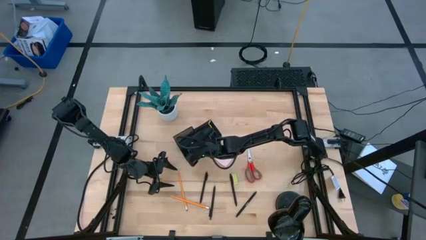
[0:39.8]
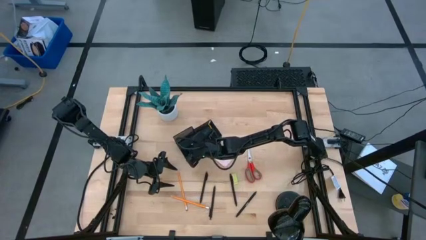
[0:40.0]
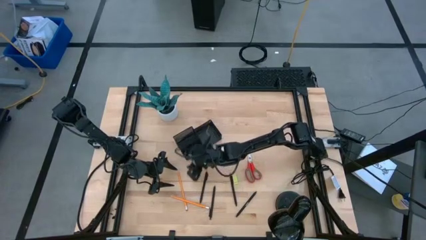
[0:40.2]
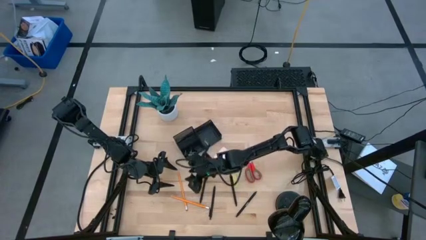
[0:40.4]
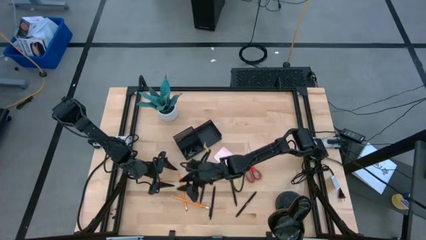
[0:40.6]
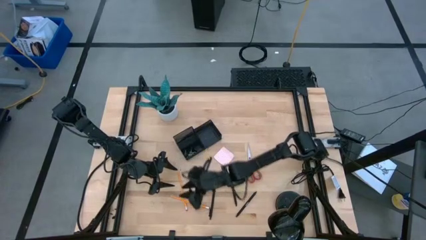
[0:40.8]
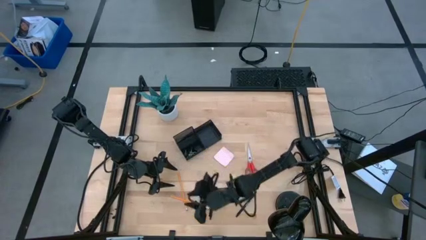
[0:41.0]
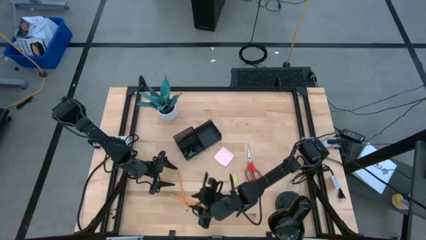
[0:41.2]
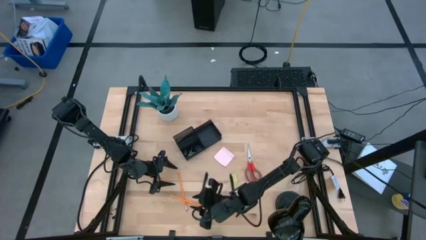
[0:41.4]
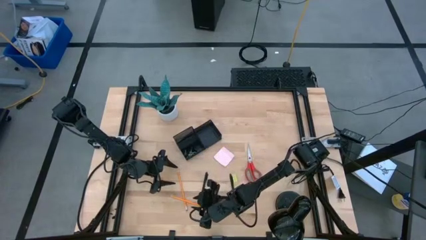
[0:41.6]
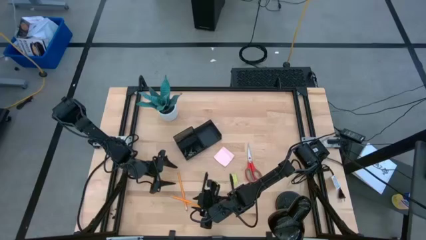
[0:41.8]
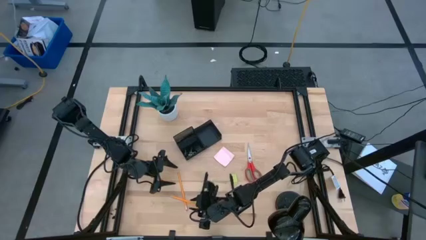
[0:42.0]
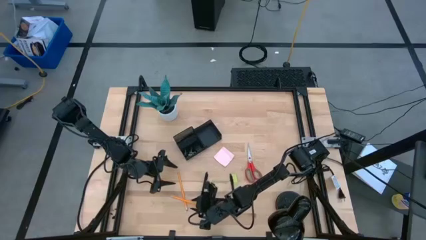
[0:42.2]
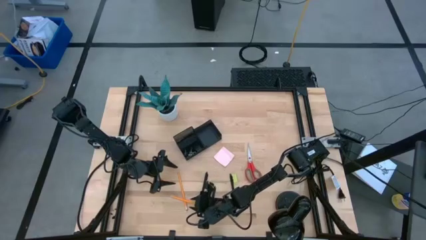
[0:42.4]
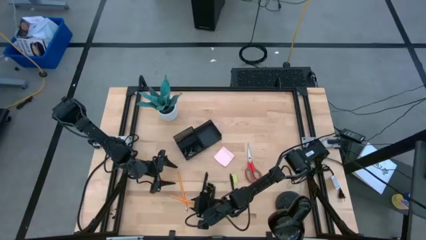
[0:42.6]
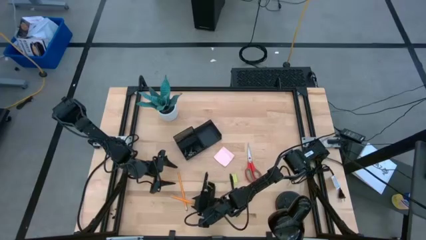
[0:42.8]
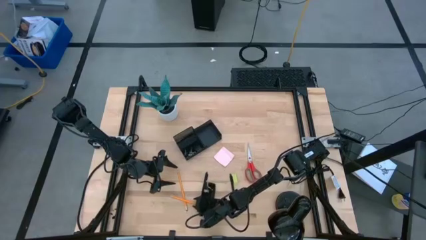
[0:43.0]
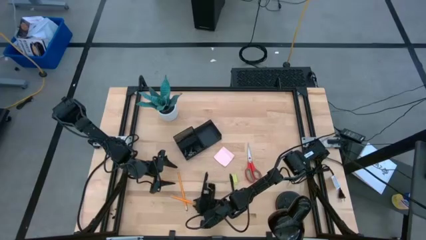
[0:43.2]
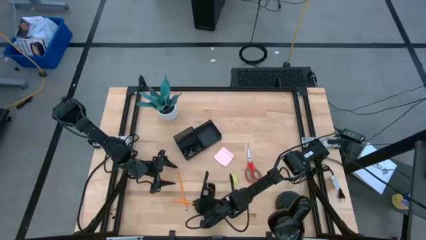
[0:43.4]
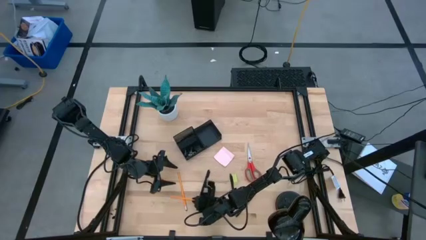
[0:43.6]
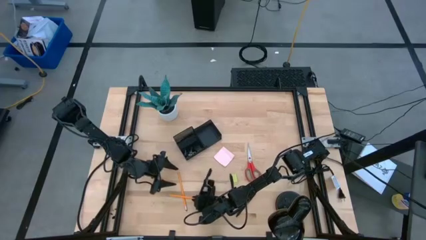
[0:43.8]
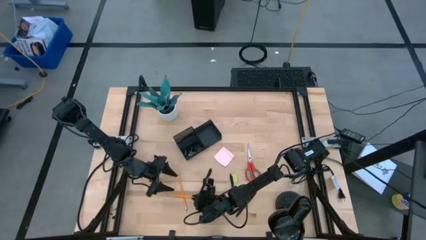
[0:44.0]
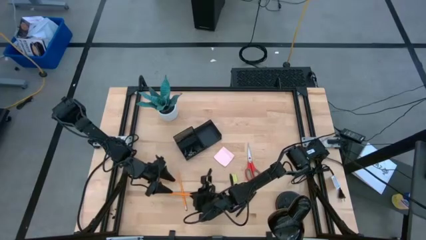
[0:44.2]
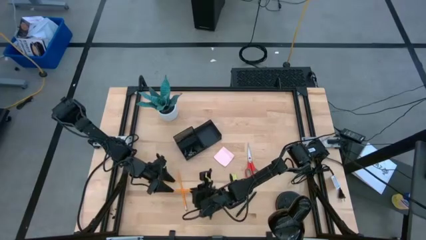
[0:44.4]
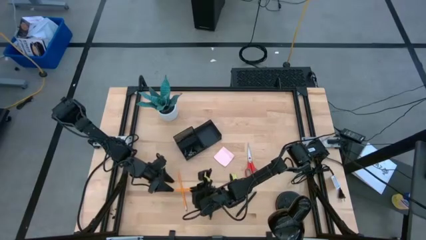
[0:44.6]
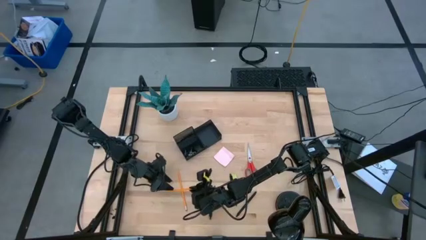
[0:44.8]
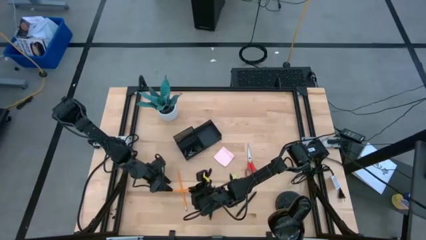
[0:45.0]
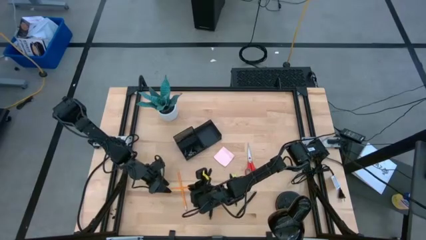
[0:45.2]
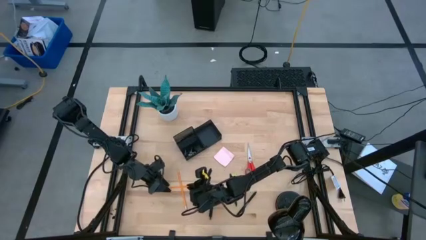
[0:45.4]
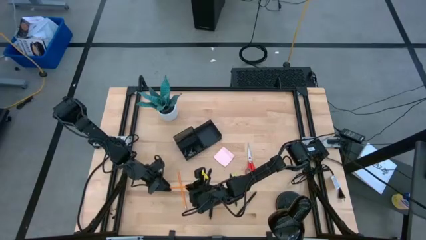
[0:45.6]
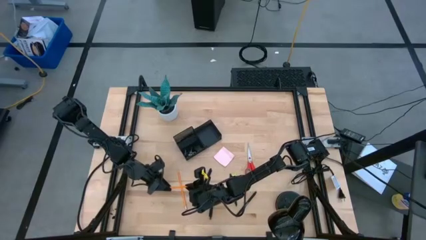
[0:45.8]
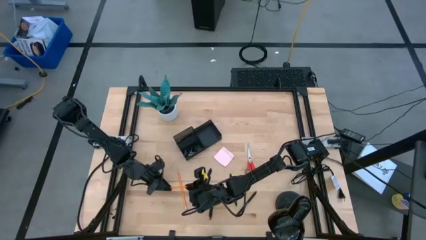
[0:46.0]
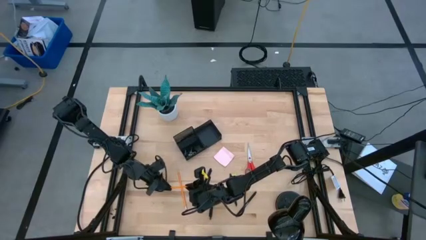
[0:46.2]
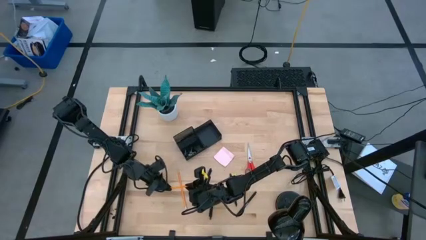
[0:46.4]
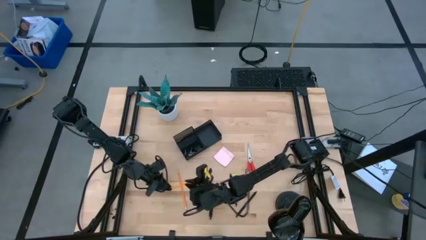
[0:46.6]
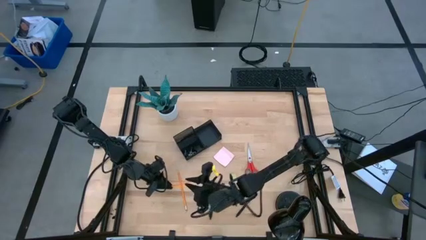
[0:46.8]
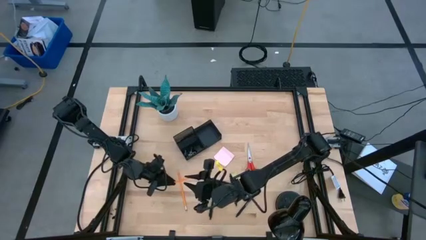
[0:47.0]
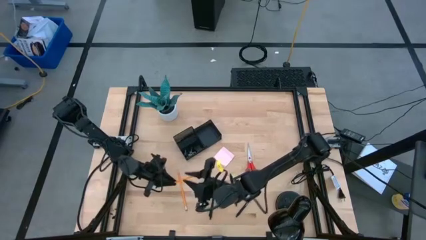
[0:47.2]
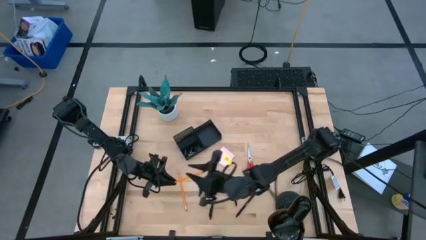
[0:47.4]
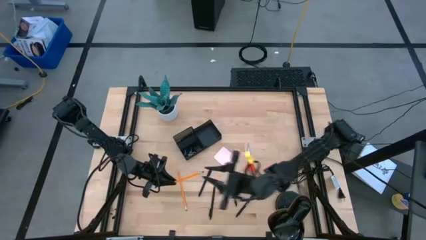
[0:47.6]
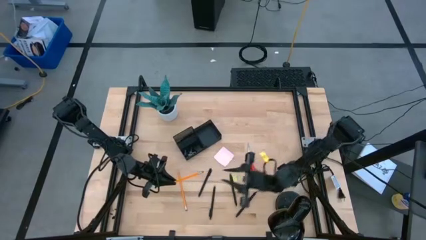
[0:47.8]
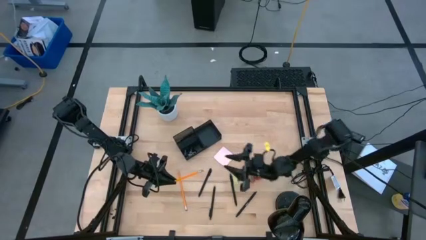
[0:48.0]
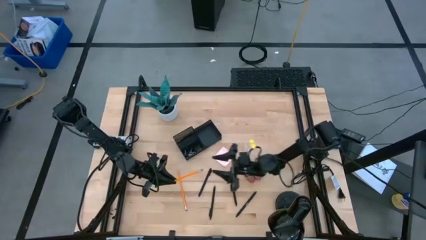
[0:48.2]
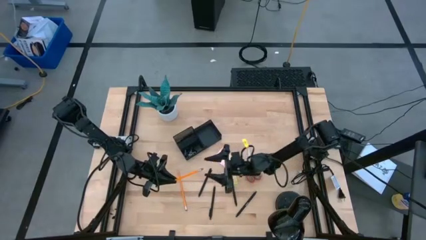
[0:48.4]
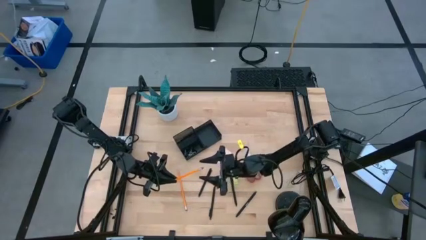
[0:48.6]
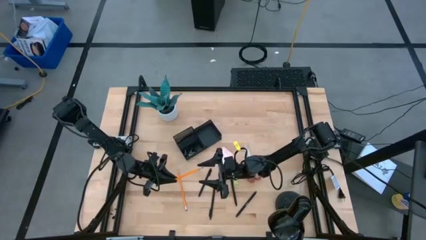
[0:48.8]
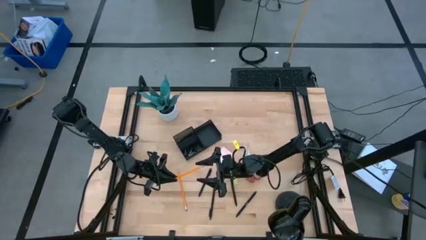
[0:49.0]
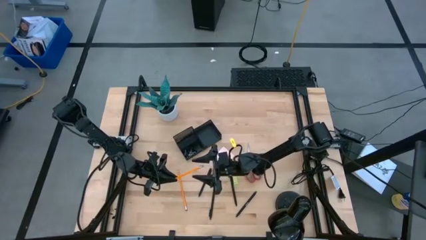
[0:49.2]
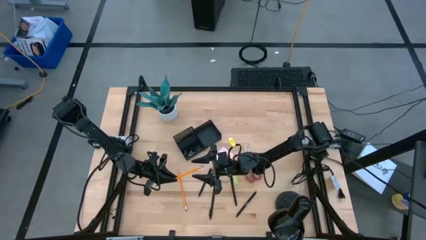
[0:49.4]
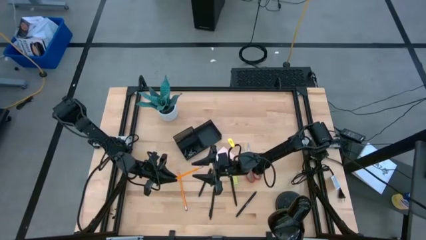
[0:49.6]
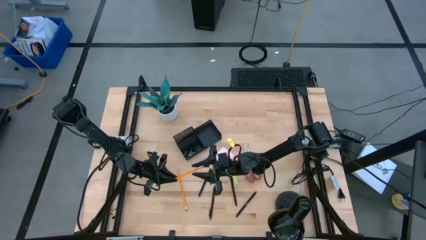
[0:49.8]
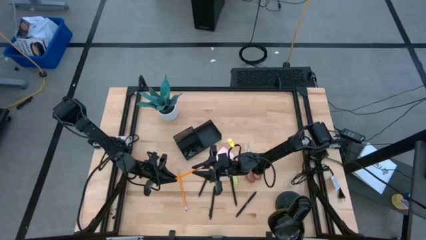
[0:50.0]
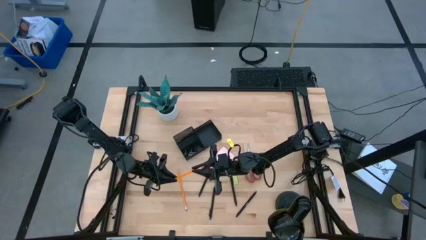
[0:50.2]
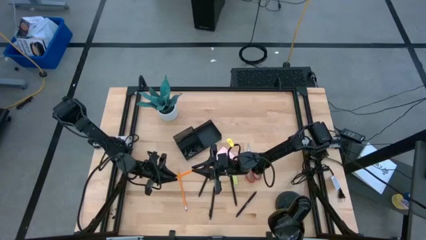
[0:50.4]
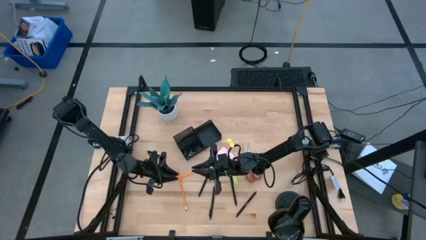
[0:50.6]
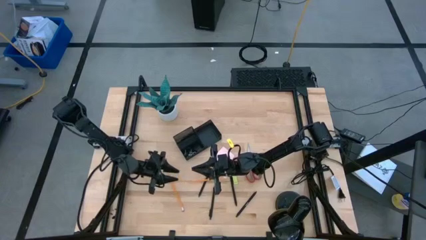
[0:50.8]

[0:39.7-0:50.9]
Task: Pick and place office supplies into organizer
Put the orange pencil into the black desk organizer

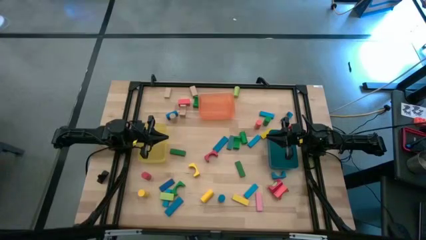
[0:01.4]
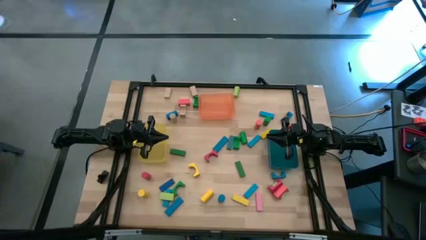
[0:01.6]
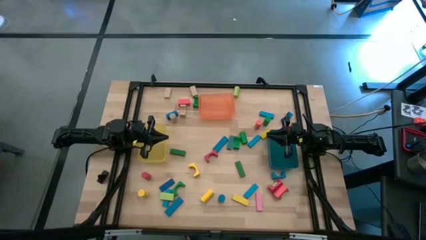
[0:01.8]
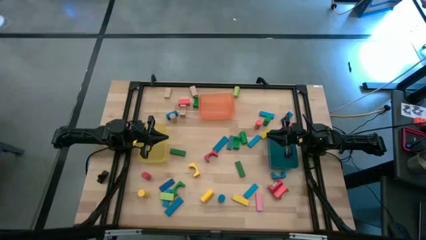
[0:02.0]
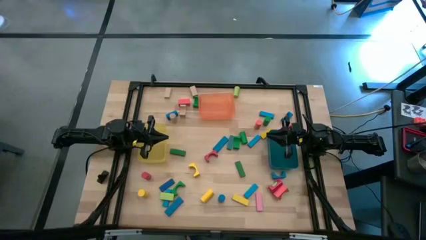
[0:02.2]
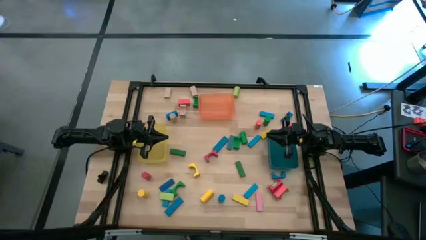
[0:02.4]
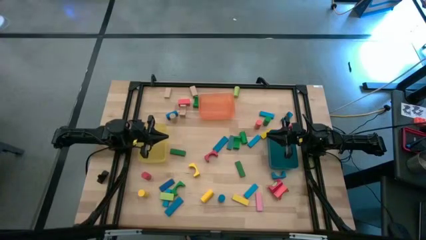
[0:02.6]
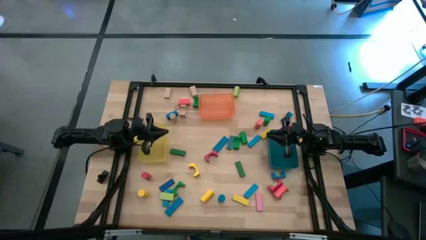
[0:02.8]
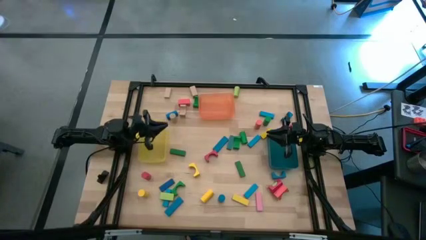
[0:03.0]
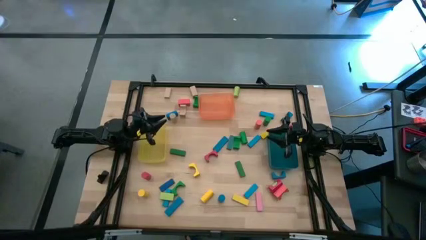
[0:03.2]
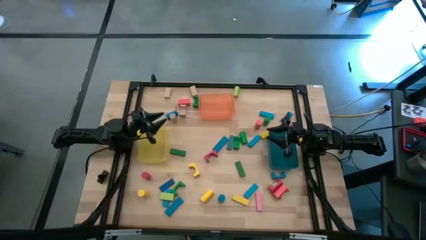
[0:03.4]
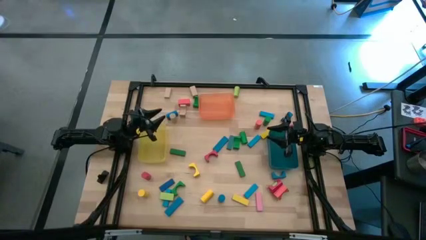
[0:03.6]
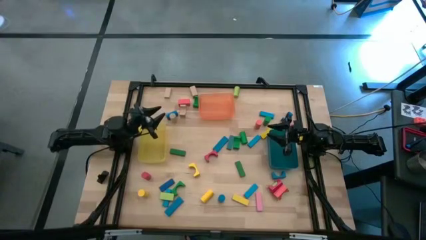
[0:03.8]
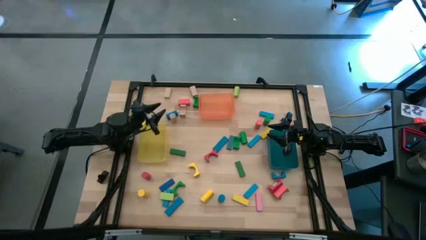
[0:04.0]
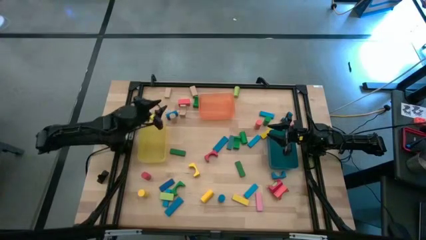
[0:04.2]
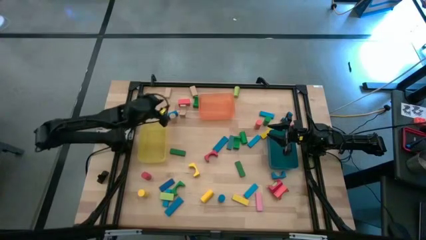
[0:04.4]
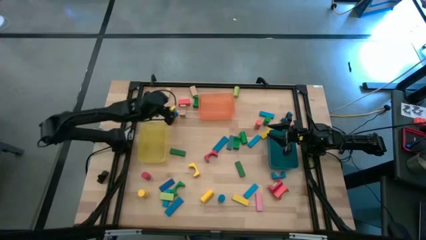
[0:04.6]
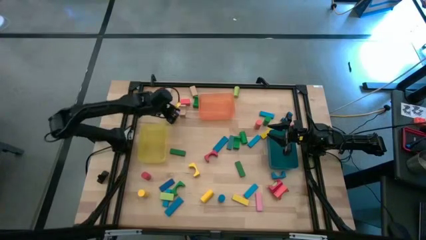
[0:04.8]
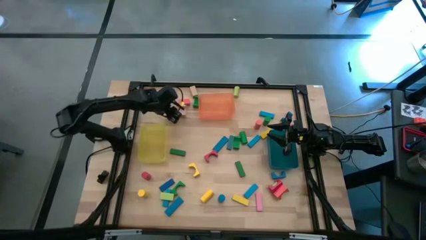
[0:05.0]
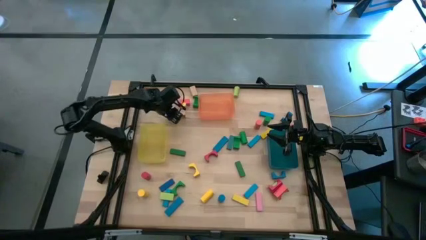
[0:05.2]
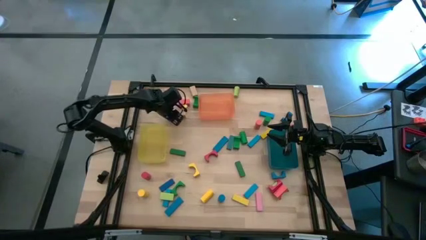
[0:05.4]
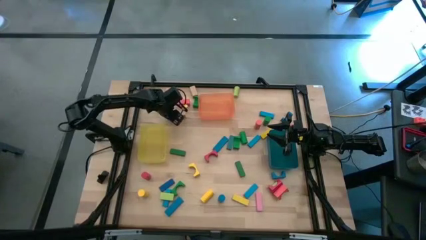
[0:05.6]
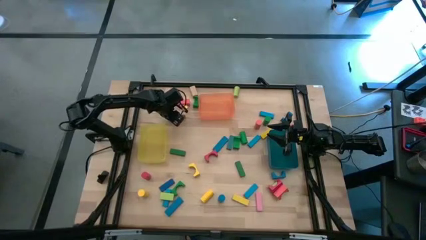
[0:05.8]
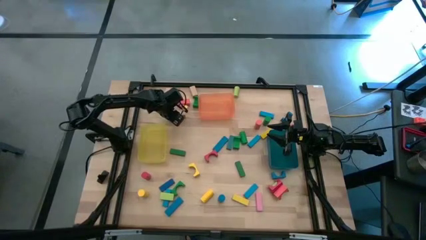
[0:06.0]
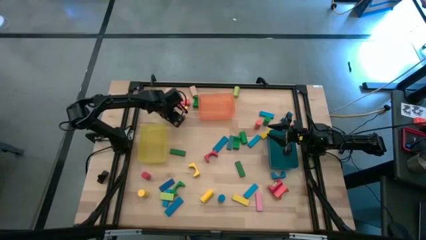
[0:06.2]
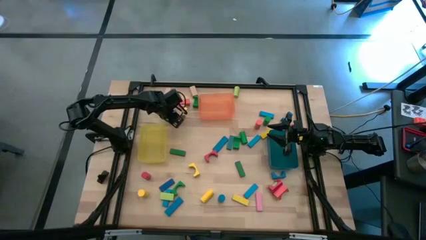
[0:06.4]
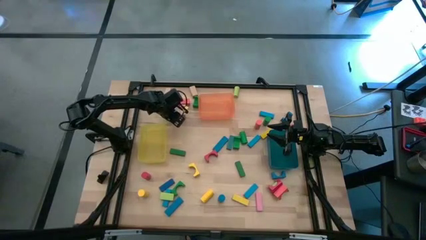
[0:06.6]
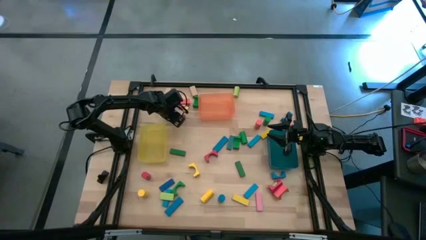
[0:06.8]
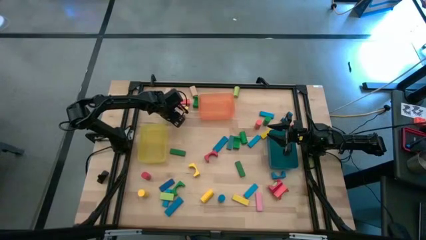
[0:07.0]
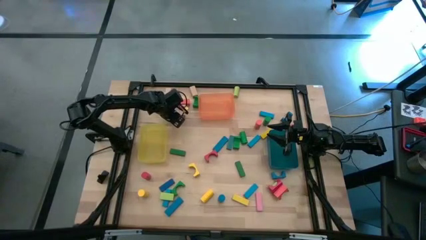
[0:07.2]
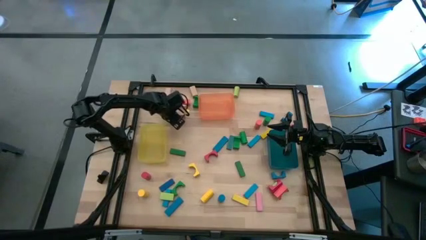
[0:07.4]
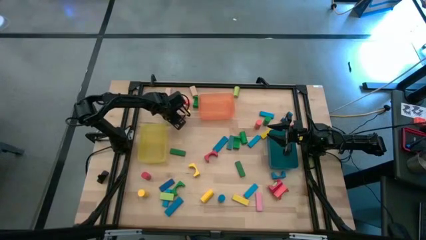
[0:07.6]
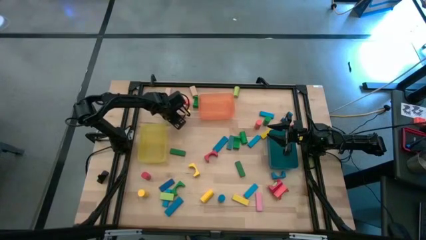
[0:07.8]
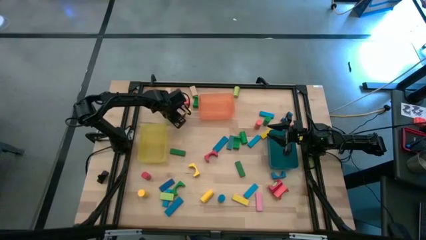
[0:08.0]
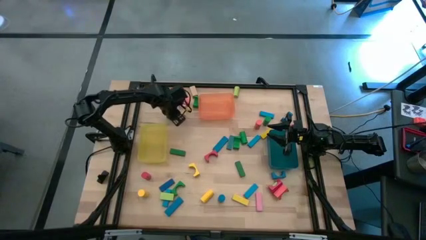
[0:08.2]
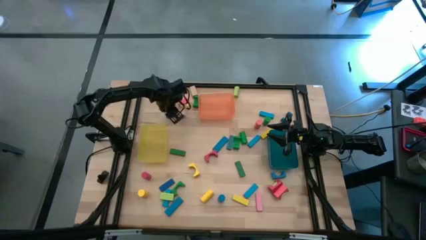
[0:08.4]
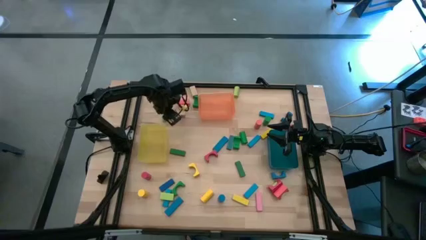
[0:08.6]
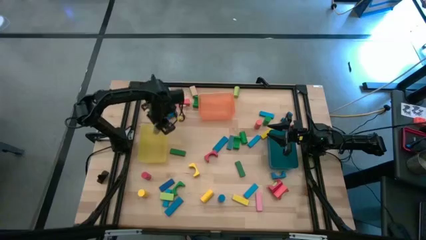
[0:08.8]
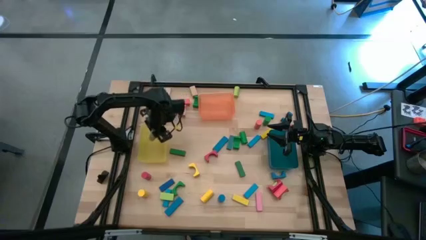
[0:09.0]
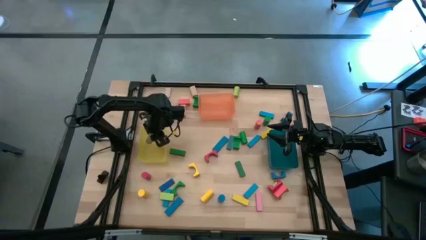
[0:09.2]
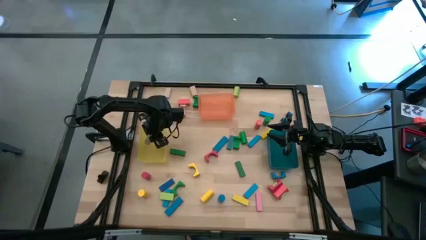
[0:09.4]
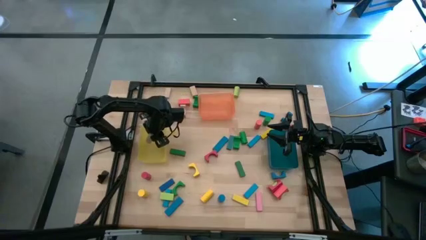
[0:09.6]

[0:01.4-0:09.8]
Task: Sort blocks by size
Put the brown cylindrical block into the yellow bin
